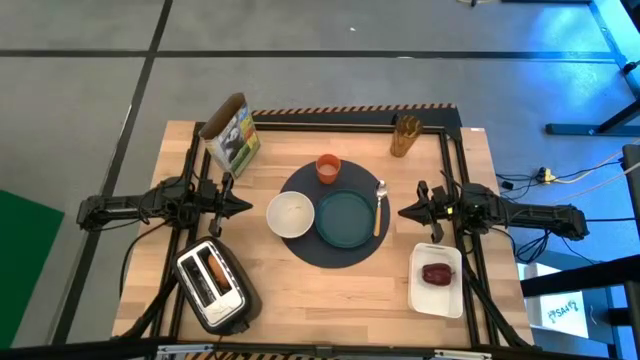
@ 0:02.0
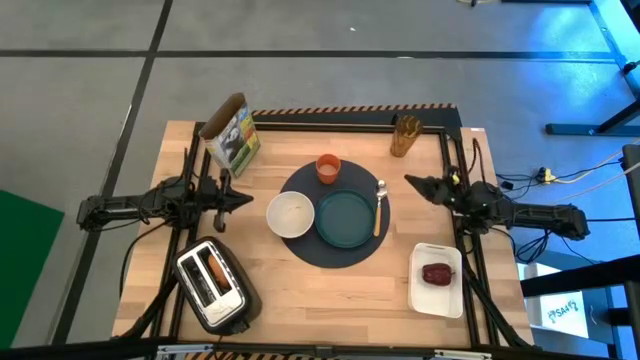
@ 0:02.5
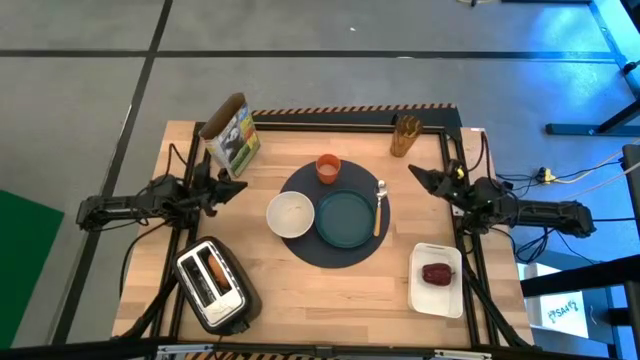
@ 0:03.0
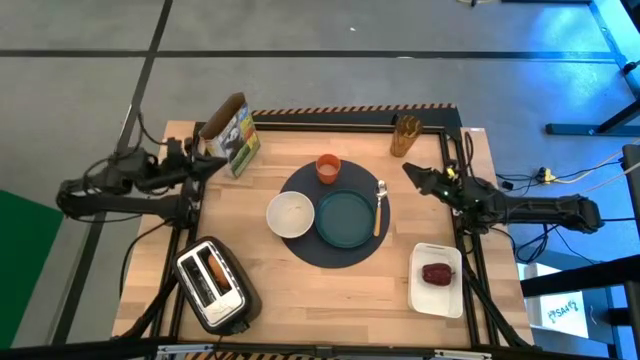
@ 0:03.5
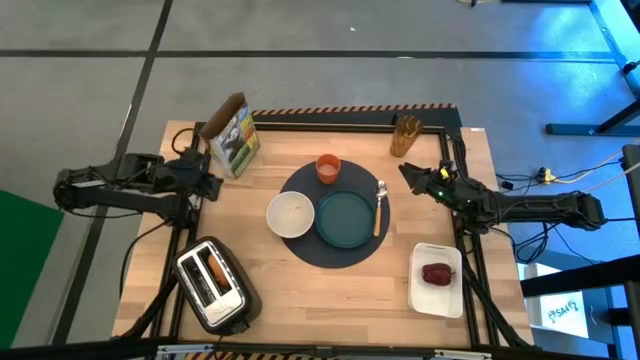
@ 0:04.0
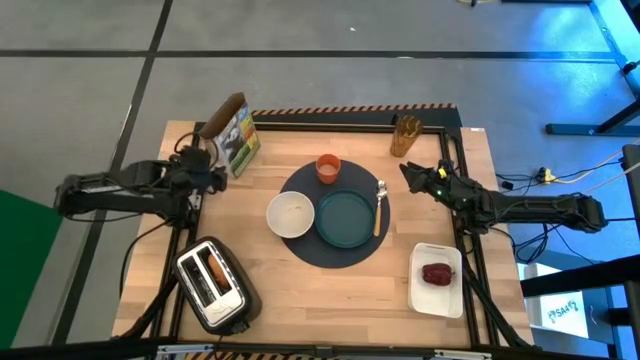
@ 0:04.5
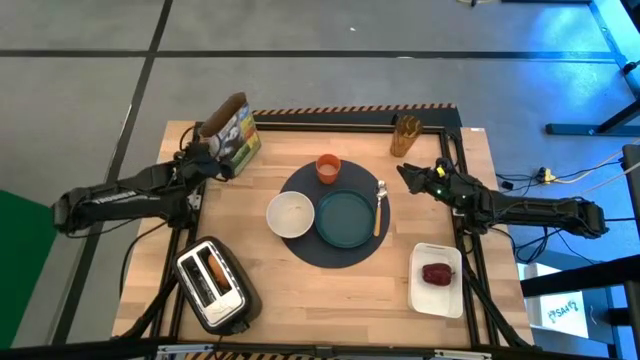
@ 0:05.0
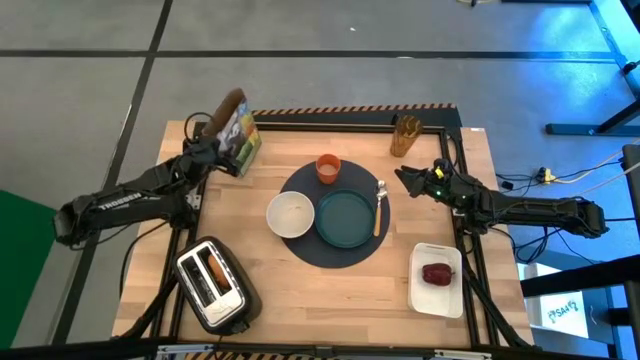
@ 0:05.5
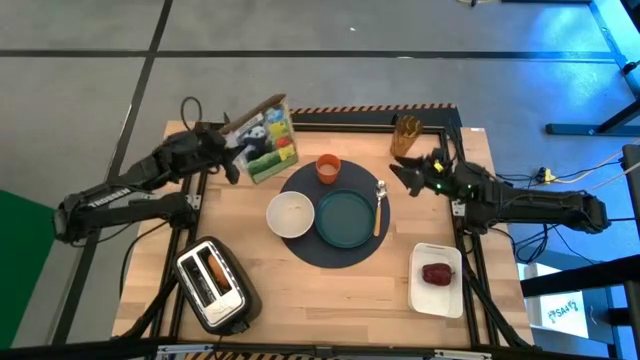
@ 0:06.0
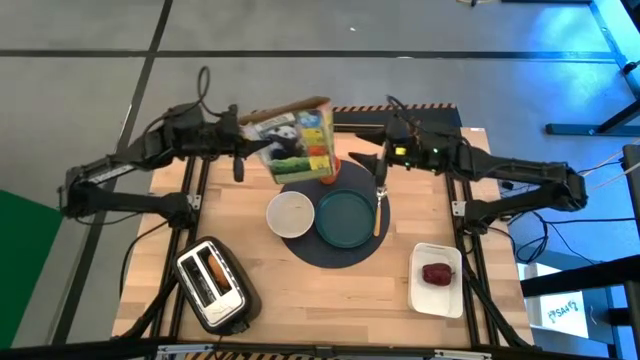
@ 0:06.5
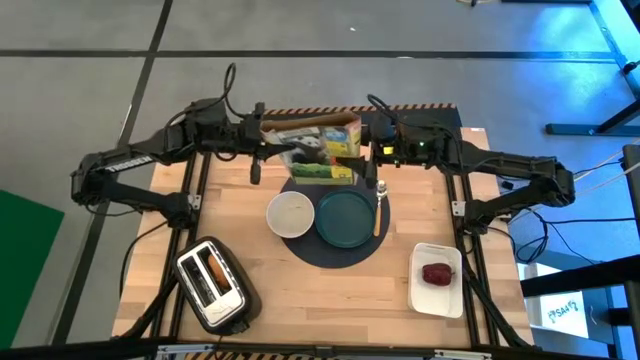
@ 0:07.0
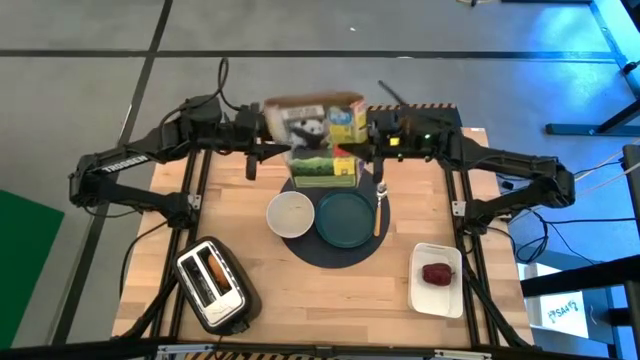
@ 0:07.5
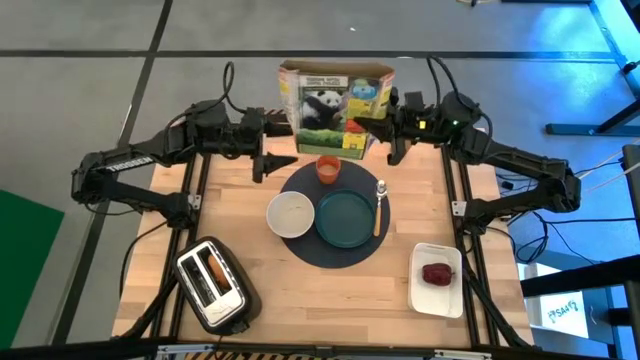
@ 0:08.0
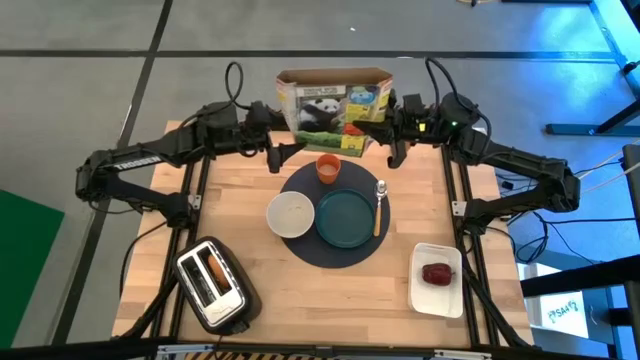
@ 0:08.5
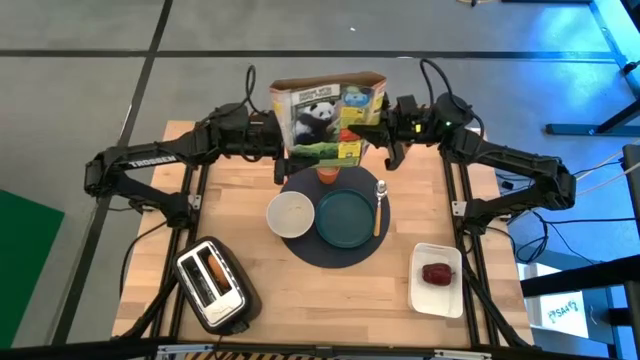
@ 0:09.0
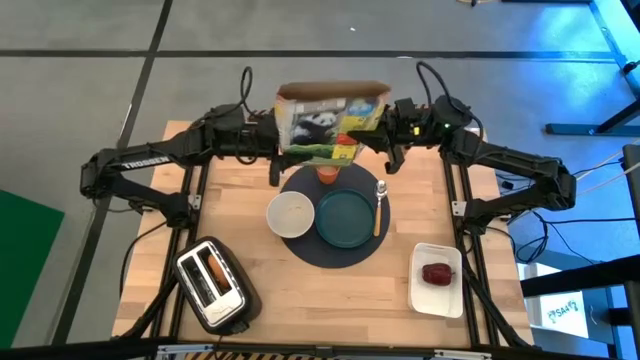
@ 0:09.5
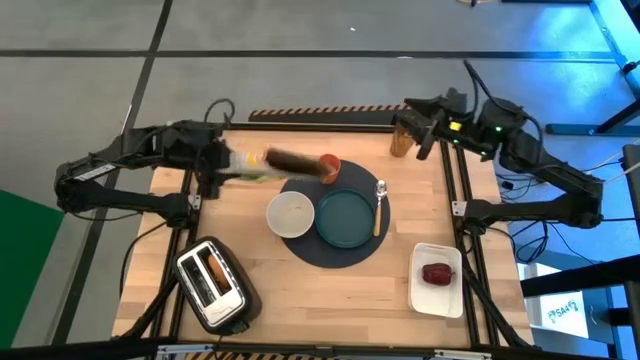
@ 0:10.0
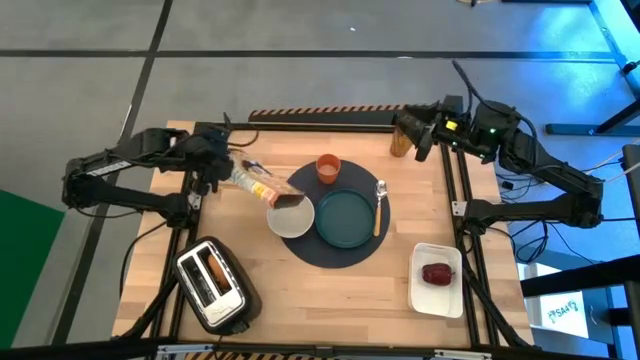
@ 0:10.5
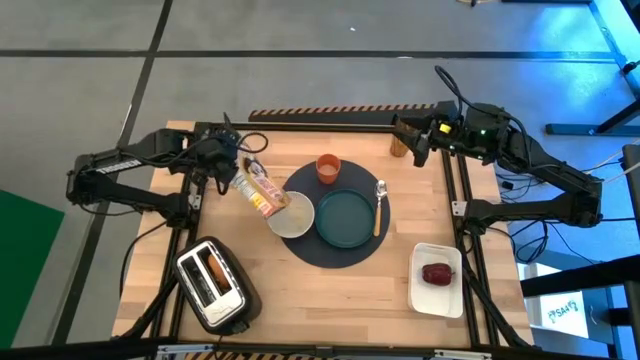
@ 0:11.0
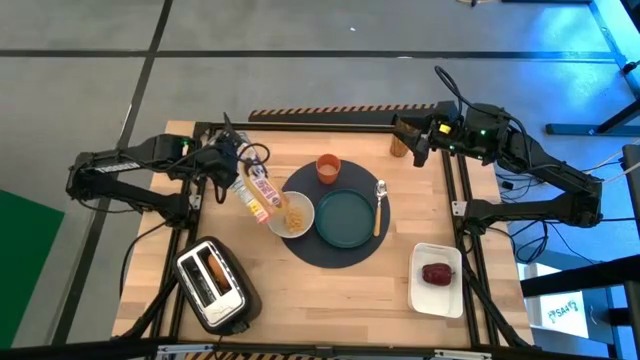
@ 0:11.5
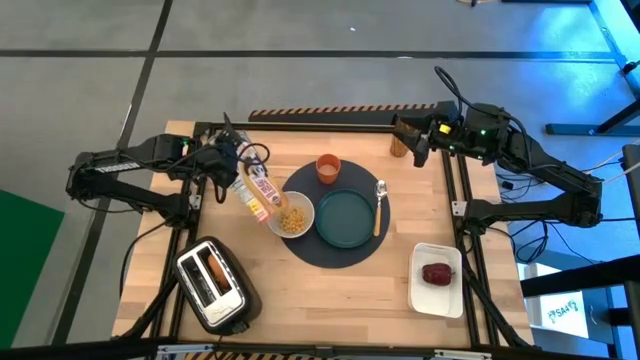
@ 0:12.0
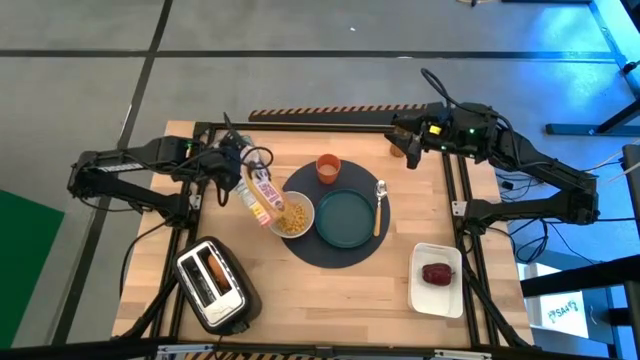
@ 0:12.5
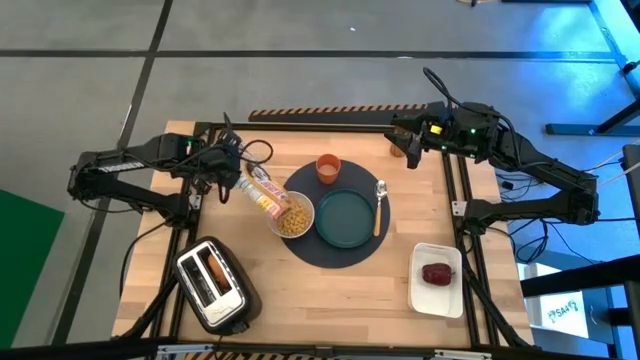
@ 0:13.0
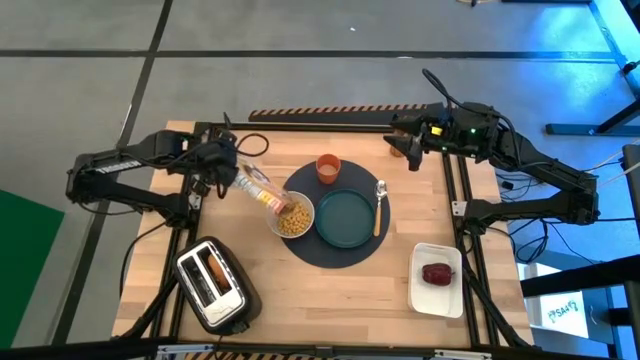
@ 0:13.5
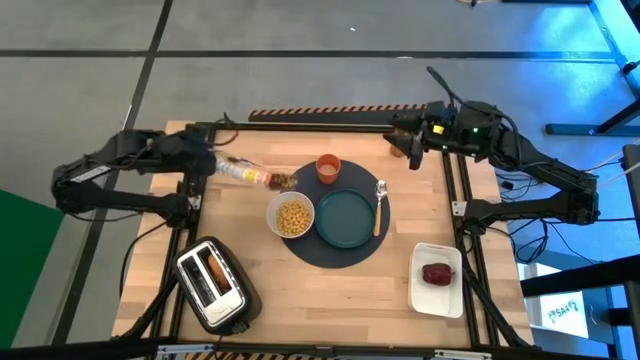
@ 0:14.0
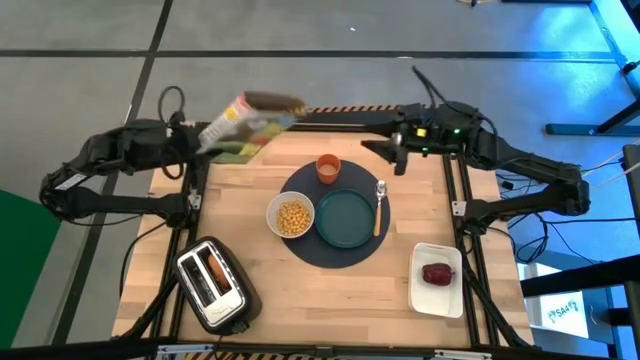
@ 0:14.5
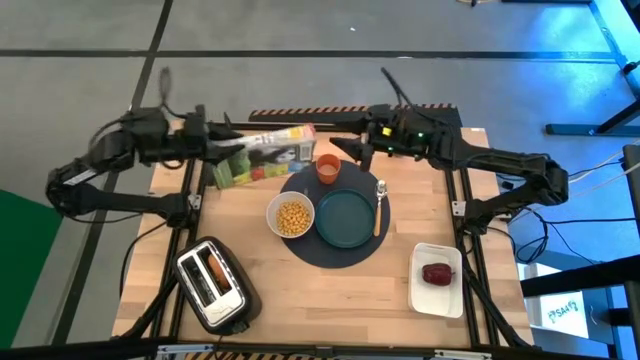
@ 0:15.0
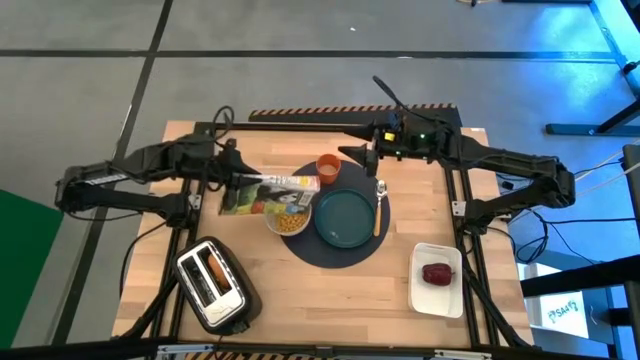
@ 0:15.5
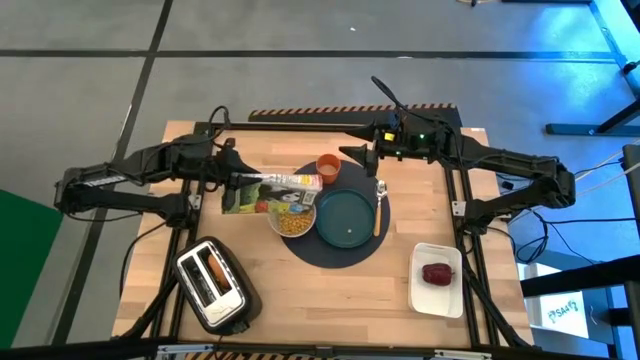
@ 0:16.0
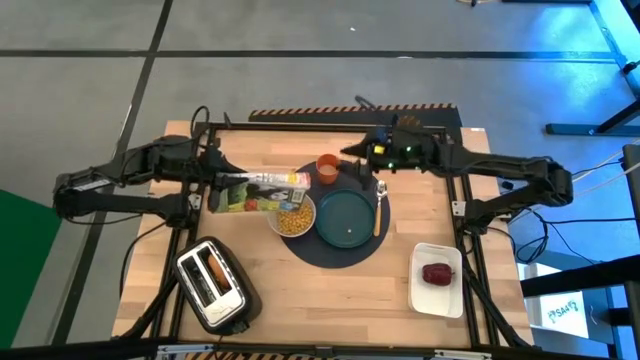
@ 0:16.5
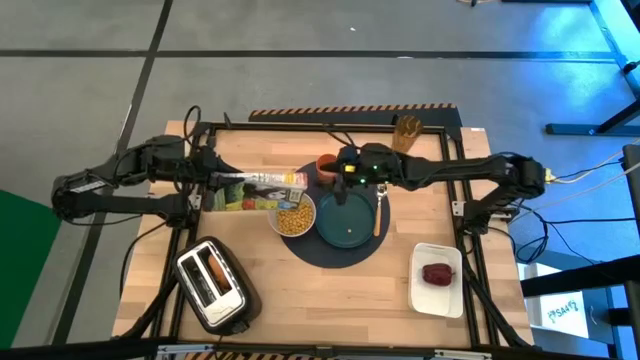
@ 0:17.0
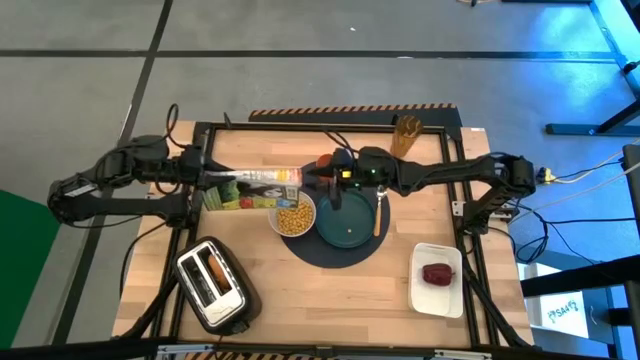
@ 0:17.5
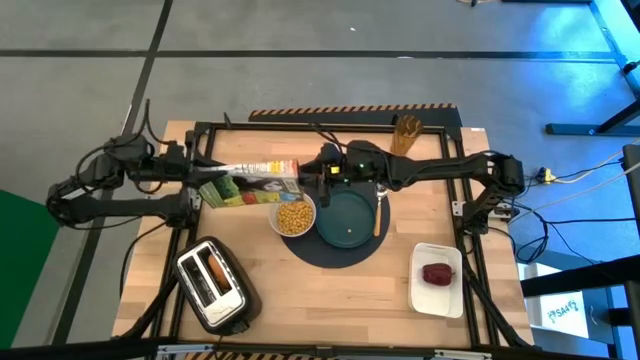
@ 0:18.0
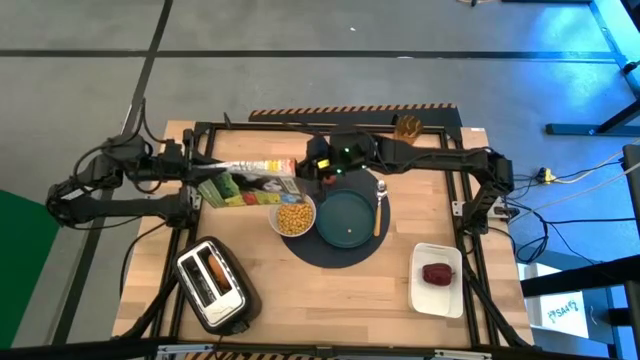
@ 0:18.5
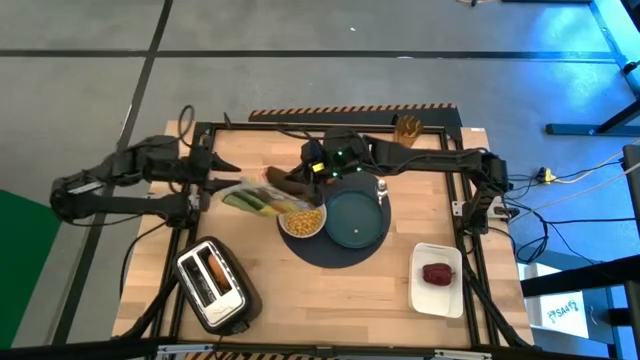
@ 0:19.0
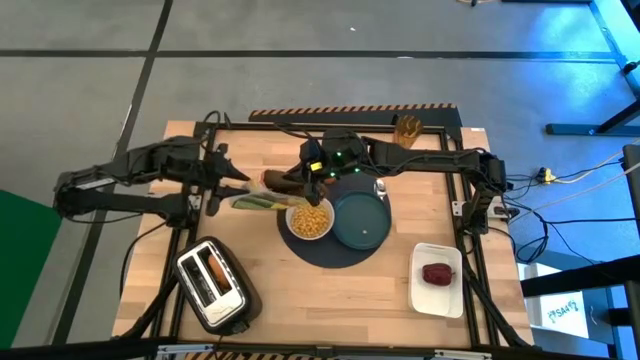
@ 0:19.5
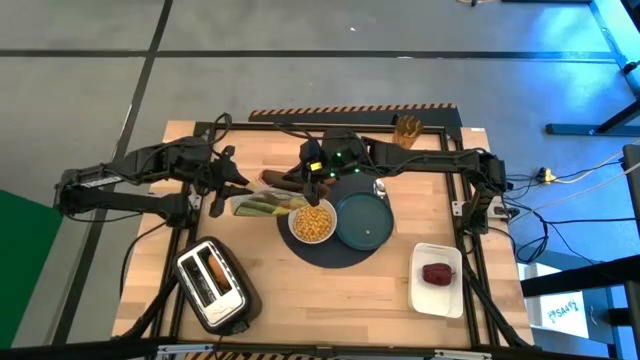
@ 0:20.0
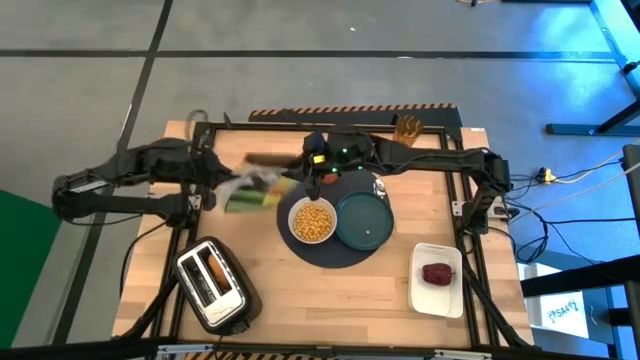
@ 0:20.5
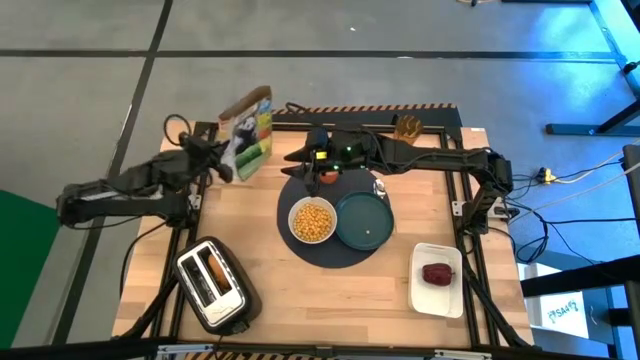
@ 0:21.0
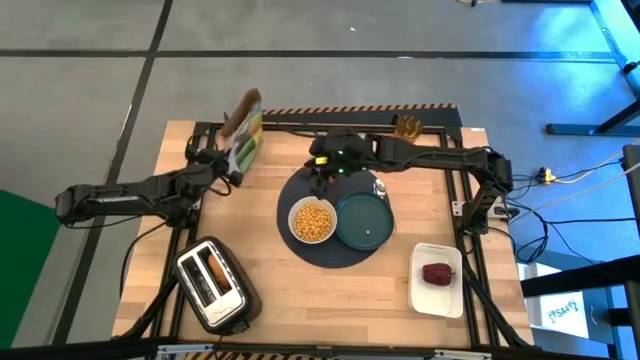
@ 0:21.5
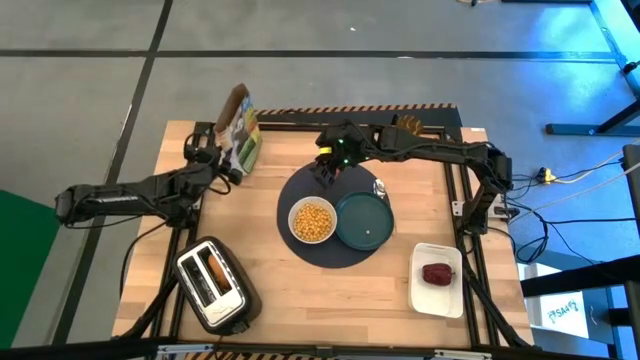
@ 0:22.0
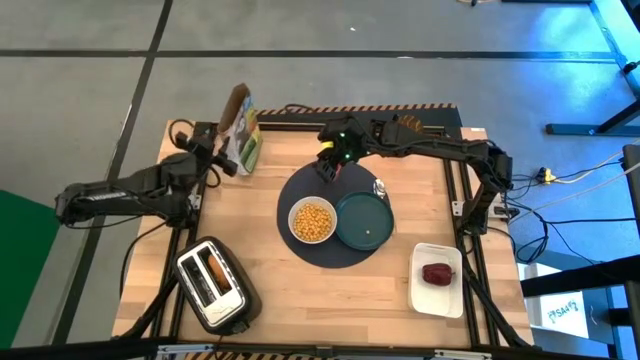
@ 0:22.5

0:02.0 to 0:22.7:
Task: Arrange a breakfast setting
Pour the cereal from the cereal box into the bowl
